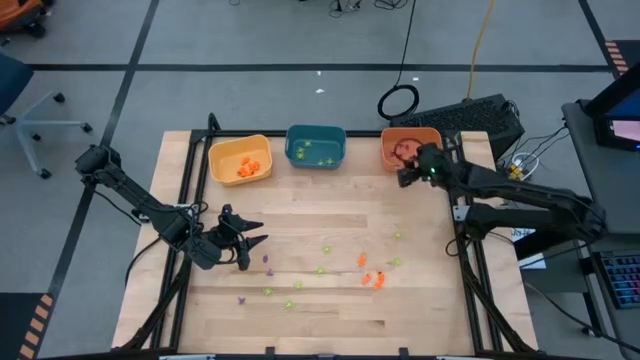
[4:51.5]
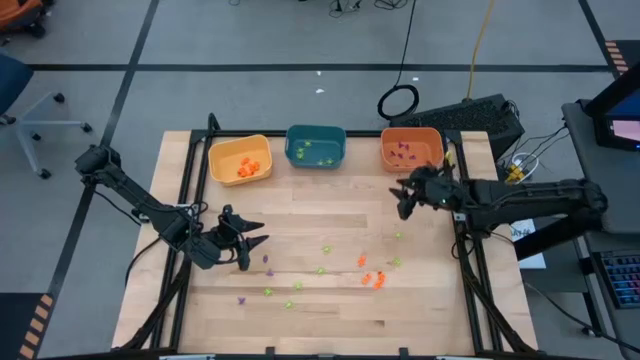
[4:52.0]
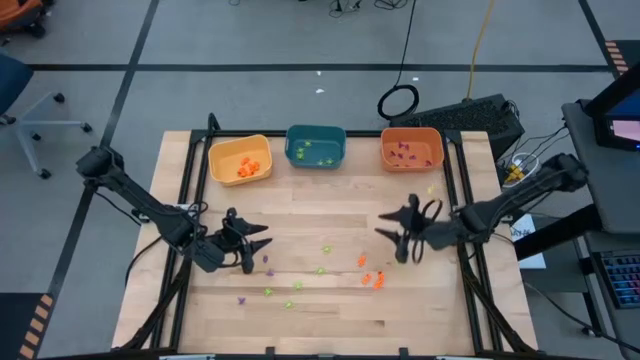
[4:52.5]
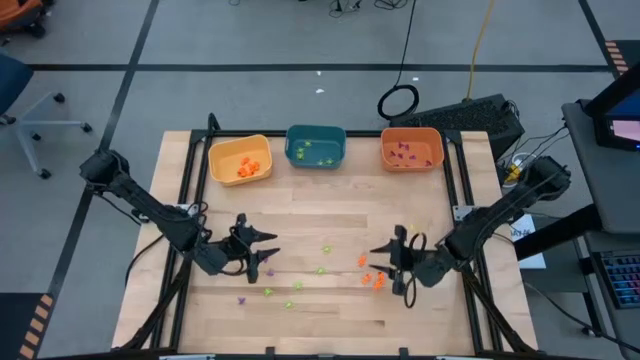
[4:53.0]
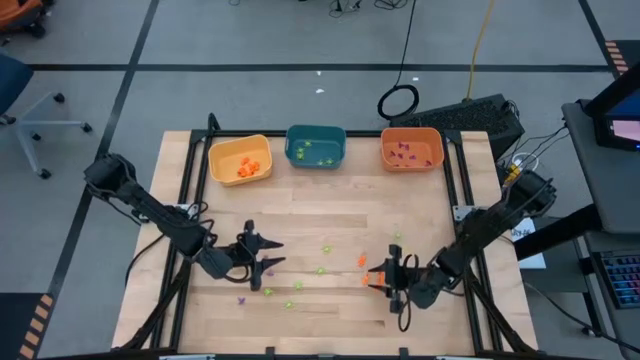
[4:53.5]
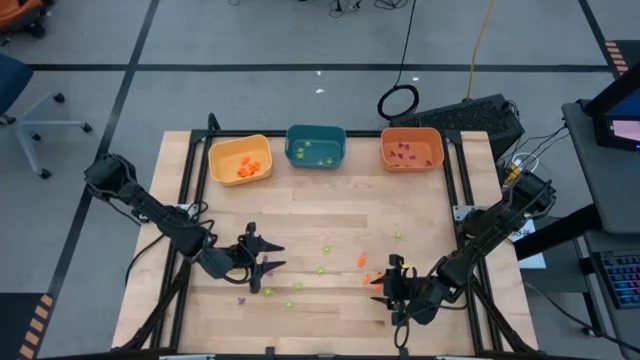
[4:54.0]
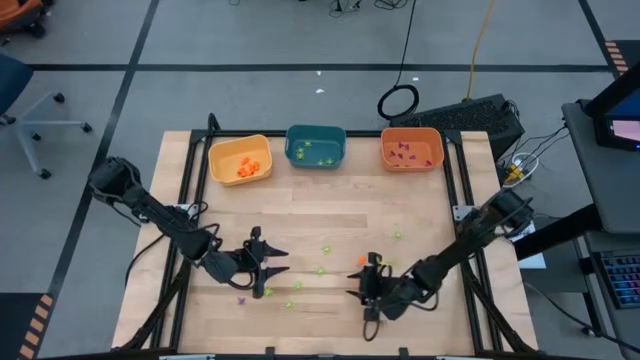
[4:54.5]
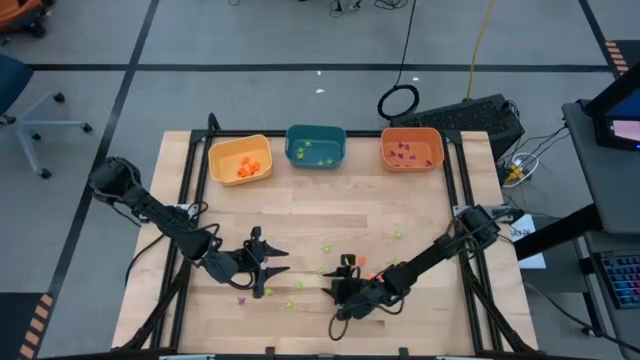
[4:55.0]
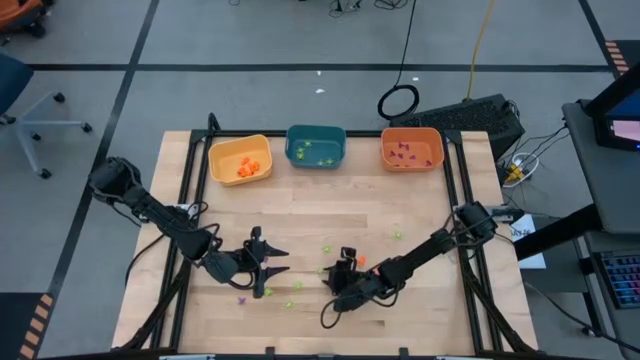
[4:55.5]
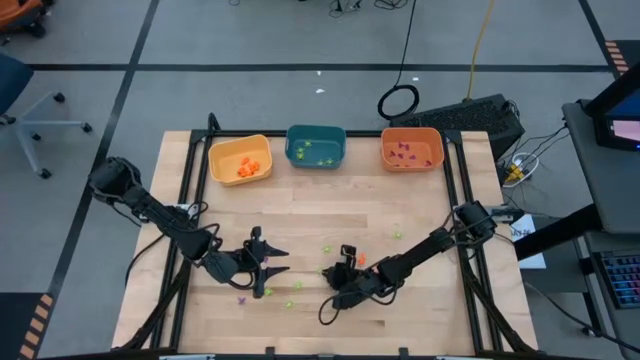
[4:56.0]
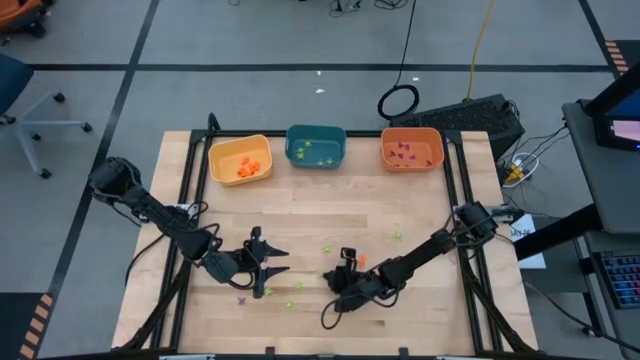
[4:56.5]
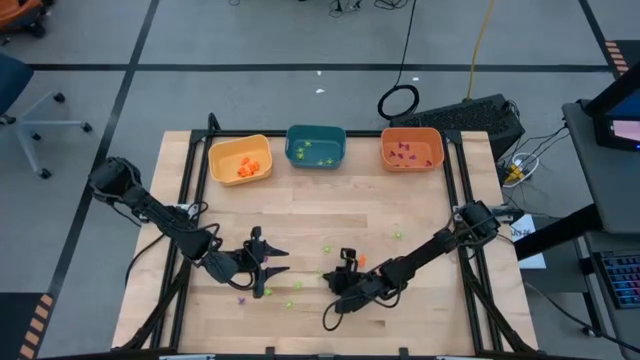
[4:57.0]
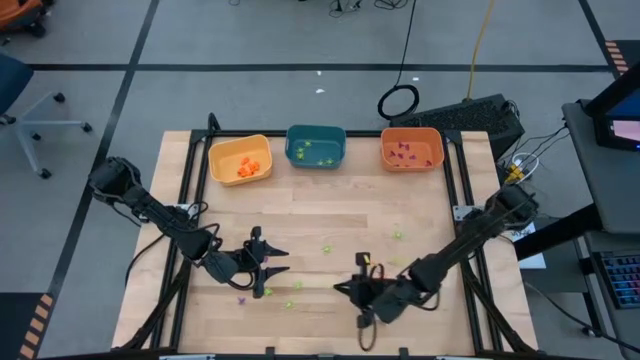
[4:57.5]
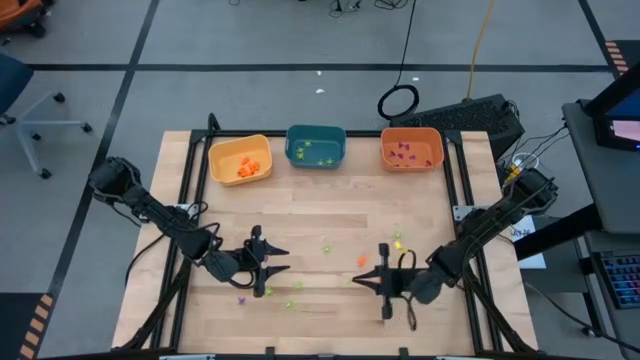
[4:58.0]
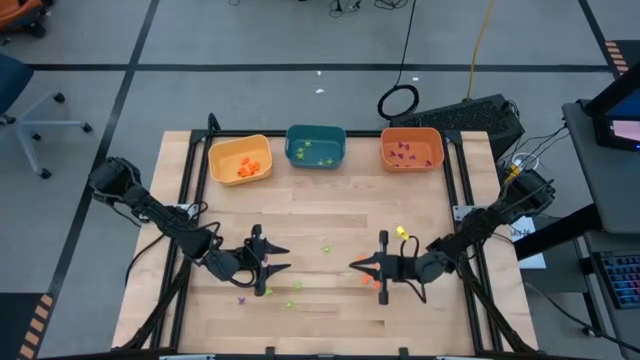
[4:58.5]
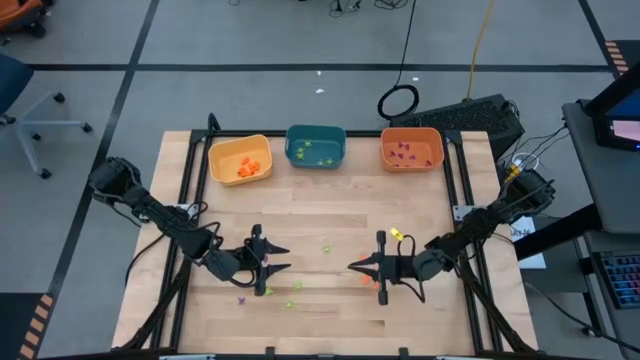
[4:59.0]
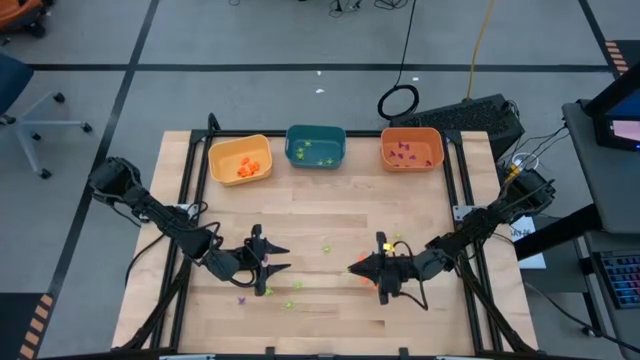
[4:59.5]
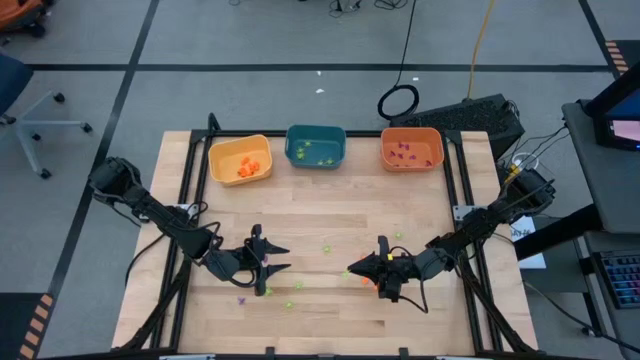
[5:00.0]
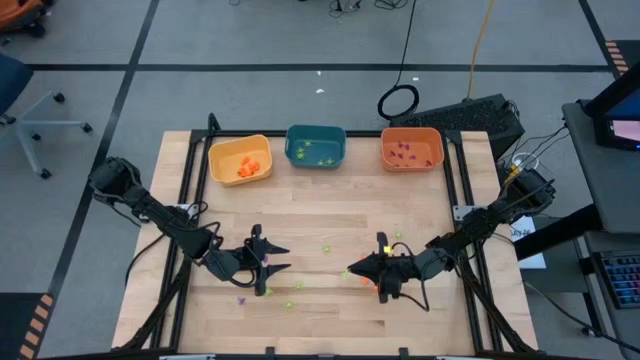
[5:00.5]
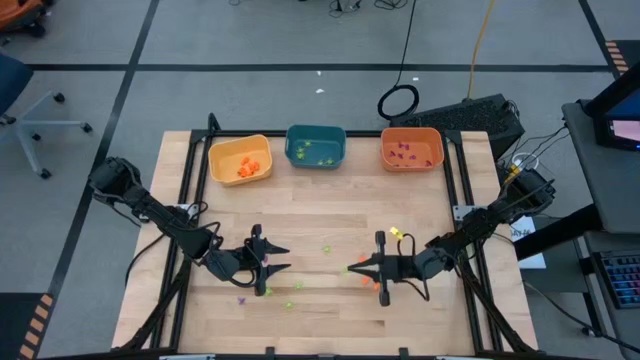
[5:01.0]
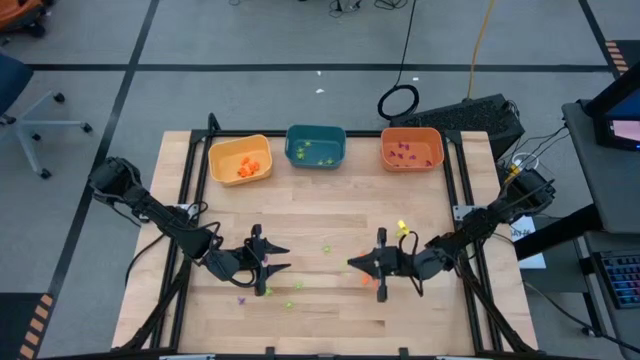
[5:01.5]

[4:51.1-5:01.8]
Task: Sort Halloween decoration
Put the green spider toy into the blue bin

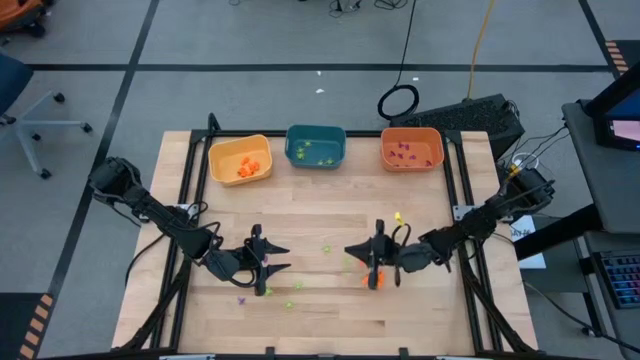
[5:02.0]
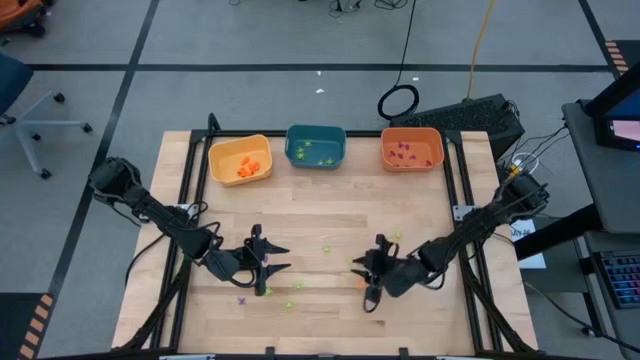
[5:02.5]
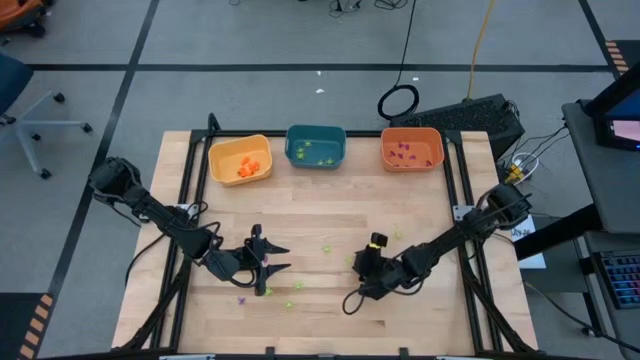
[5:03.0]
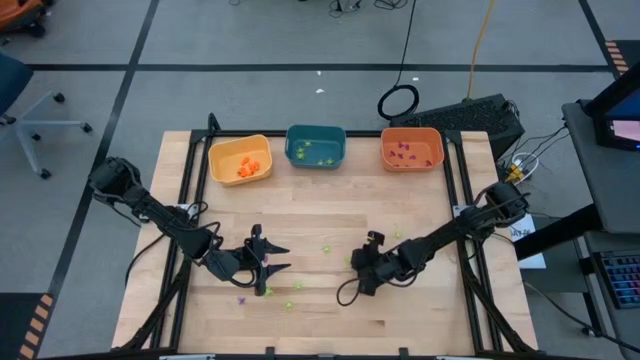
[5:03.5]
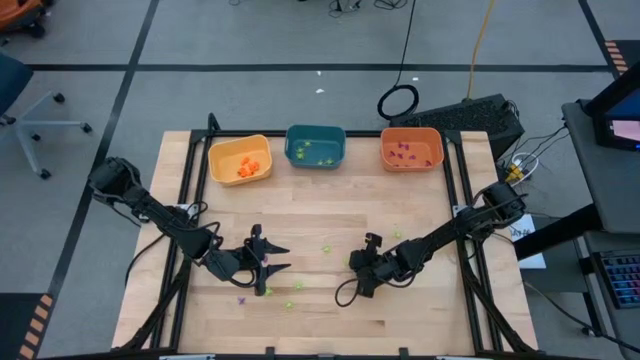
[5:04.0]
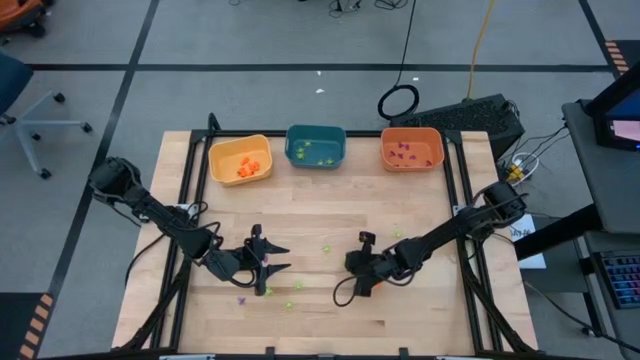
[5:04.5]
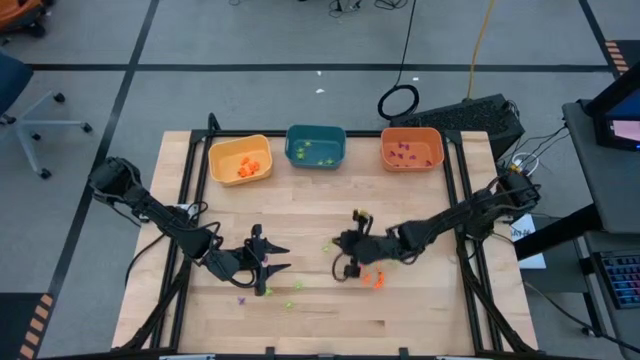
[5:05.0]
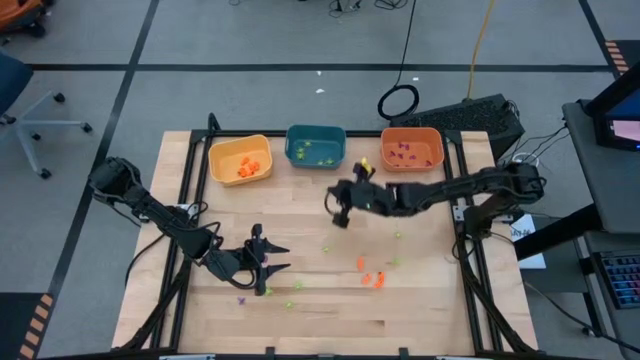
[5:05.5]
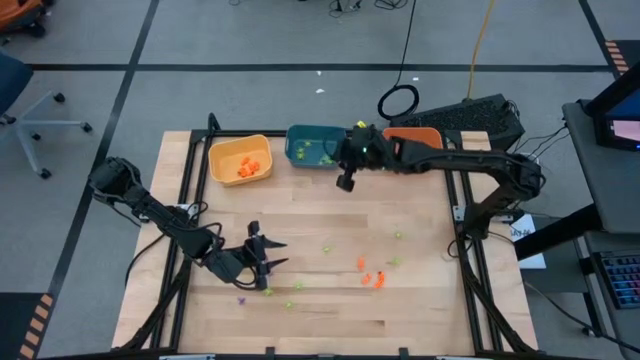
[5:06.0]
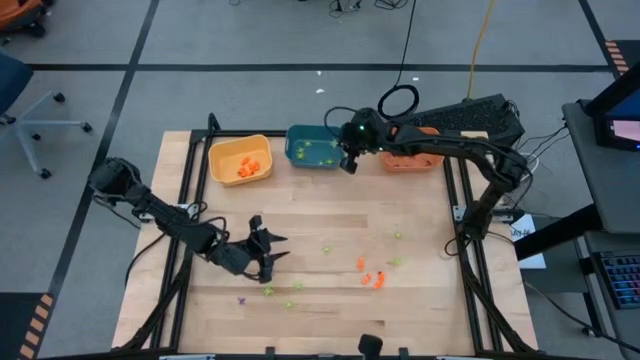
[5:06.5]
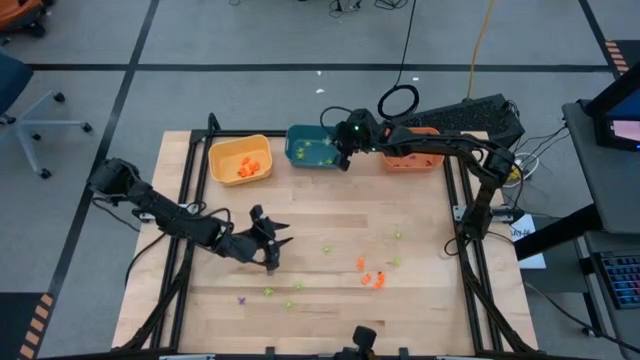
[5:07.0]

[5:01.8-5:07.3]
Put the green spider toy into the blue bin

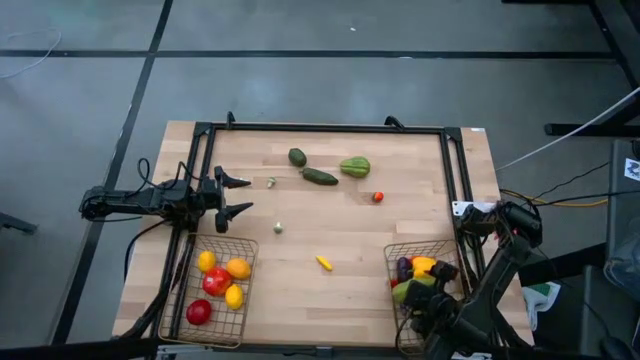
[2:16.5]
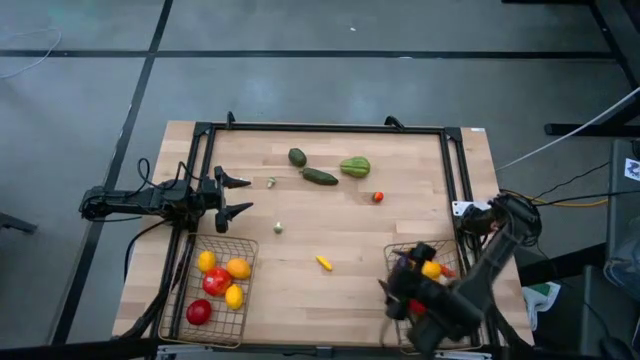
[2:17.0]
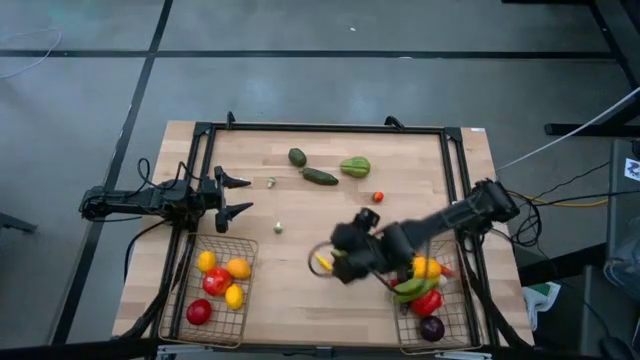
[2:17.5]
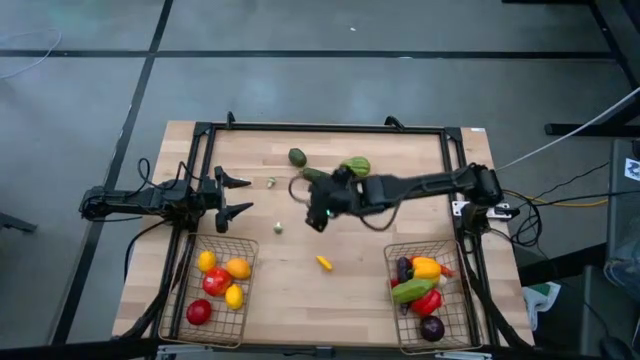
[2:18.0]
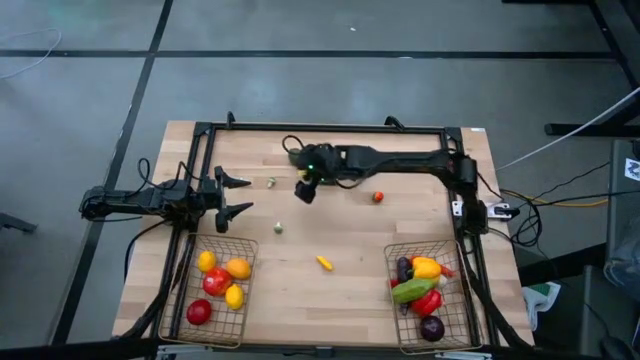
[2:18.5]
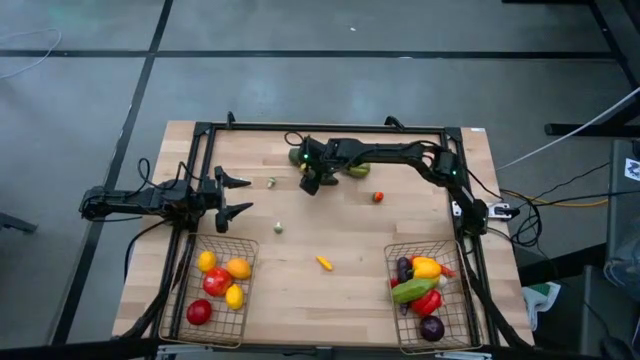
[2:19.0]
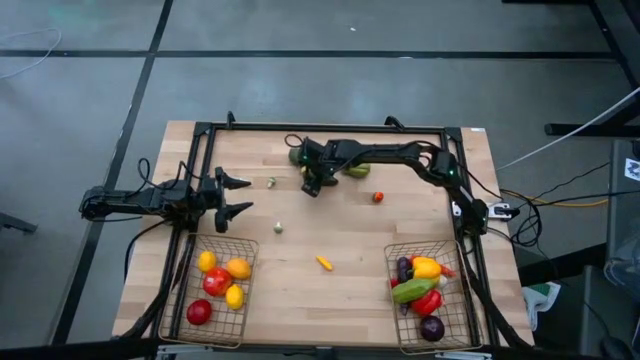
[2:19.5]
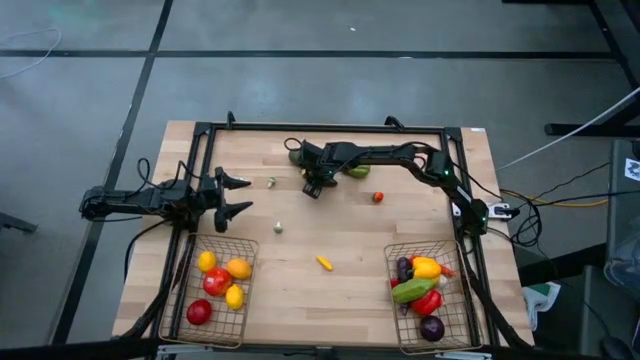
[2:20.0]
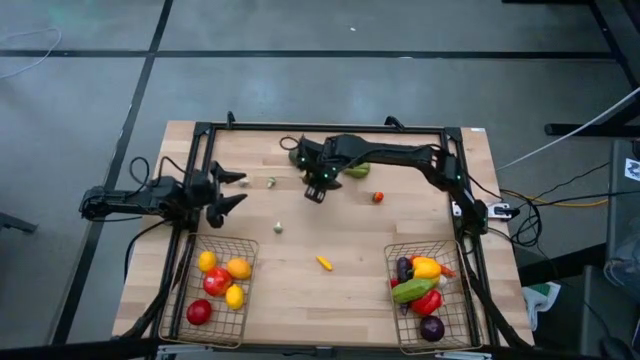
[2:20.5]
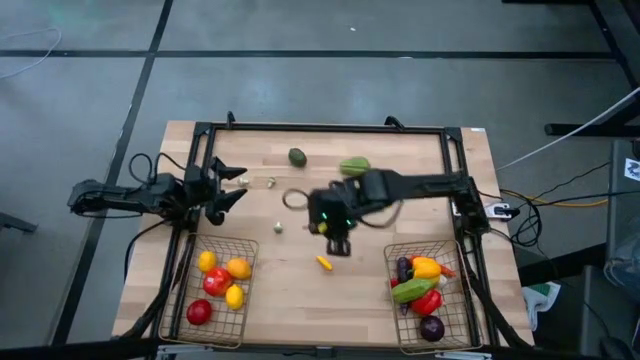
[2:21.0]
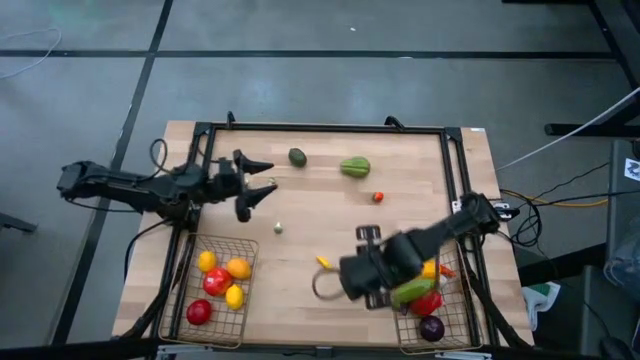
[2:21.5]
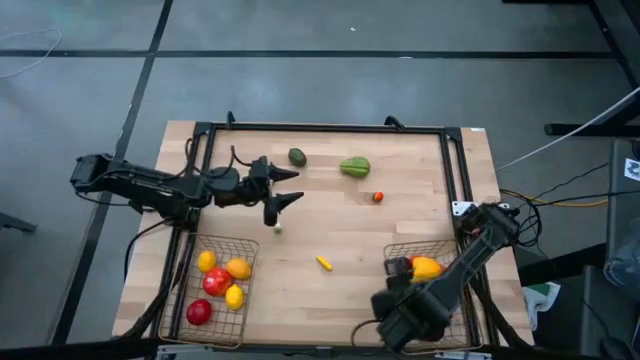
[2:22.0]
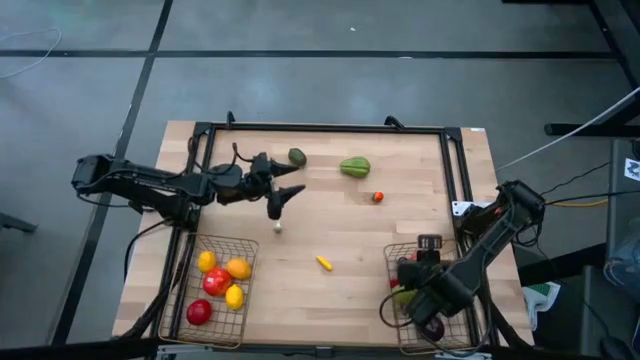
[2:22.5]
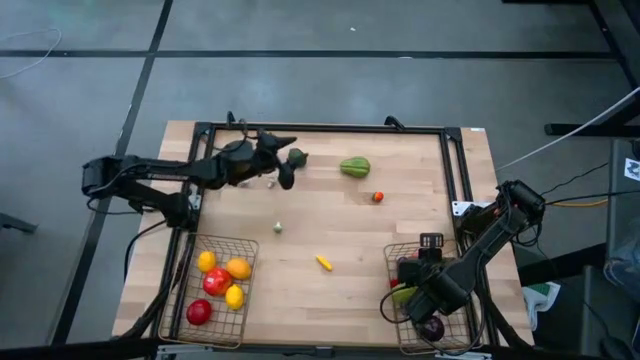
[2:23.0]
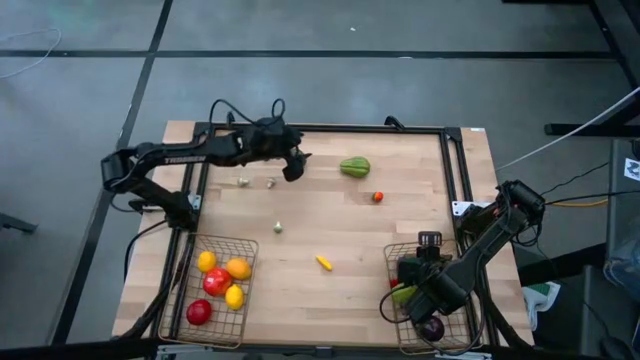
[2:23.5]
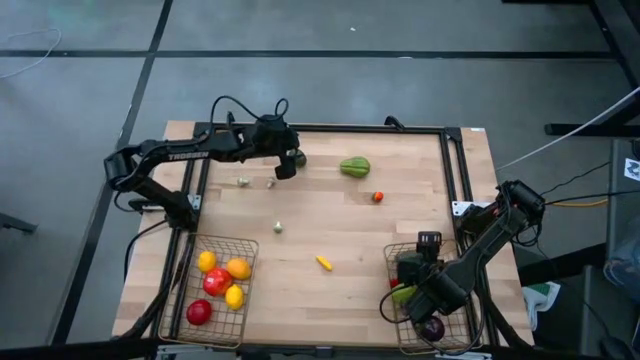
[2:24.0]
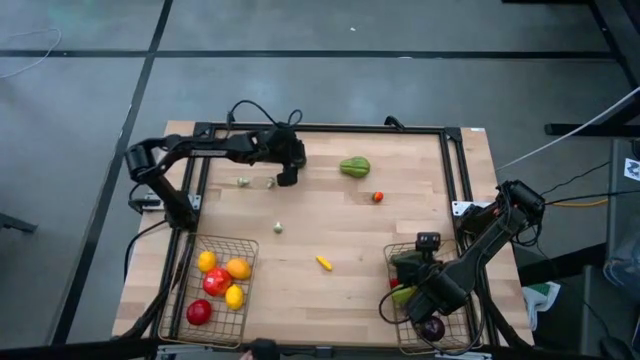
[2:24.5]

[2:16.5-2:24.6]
Task: Sort produce into baskets
Put the green chili pepper into the right wire basket
